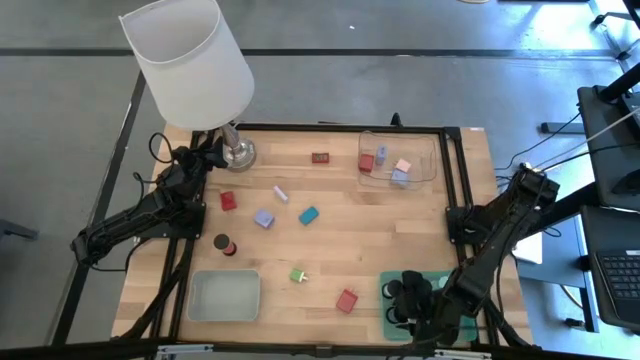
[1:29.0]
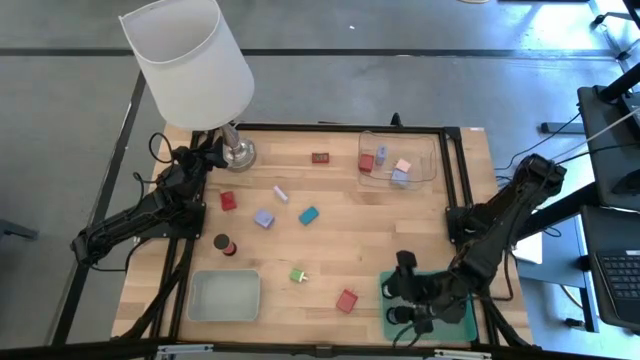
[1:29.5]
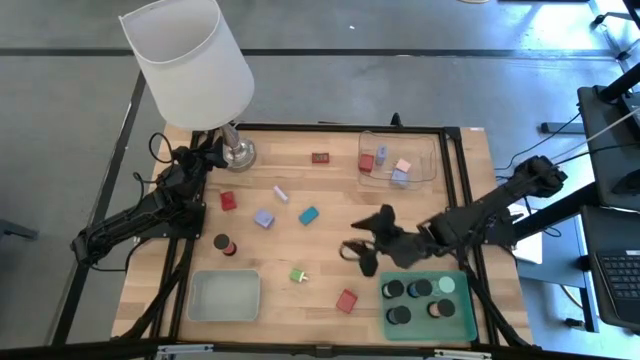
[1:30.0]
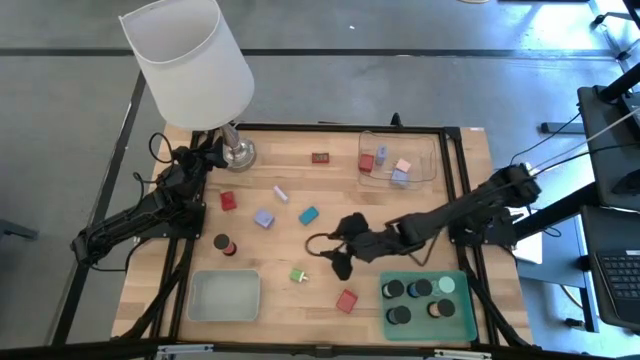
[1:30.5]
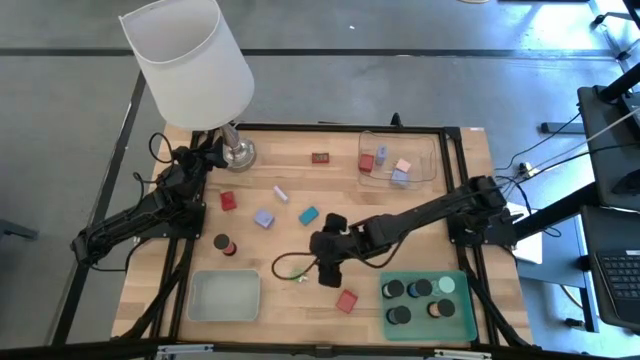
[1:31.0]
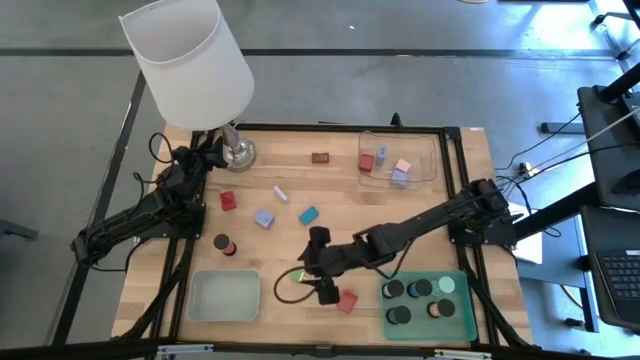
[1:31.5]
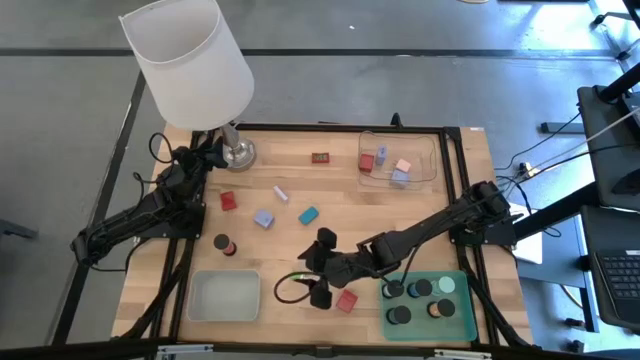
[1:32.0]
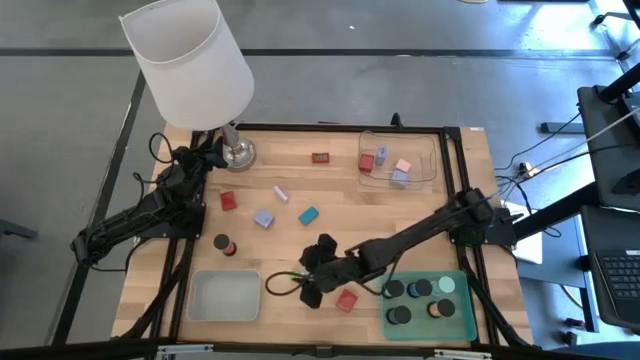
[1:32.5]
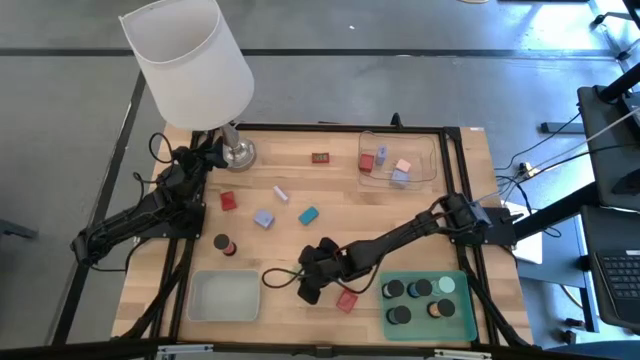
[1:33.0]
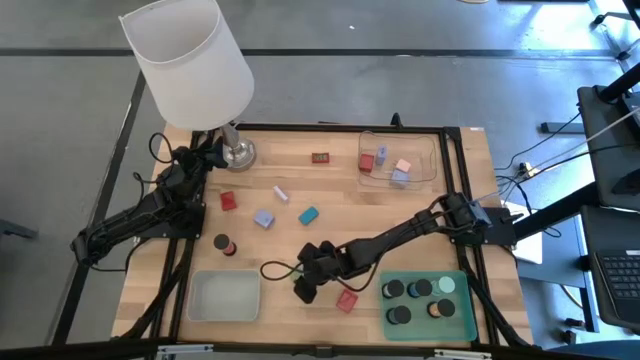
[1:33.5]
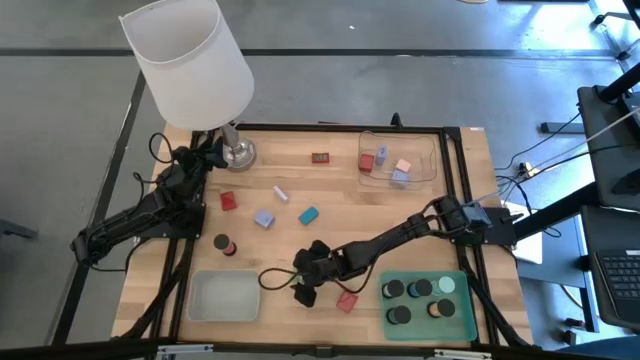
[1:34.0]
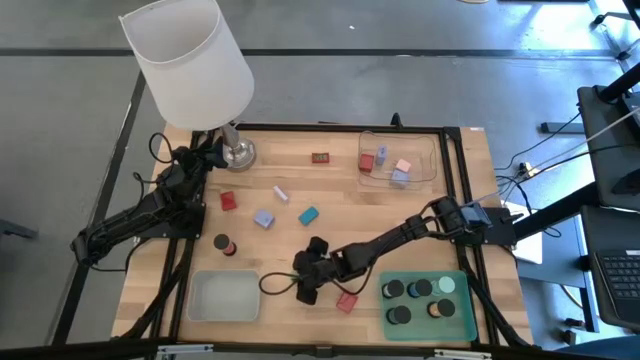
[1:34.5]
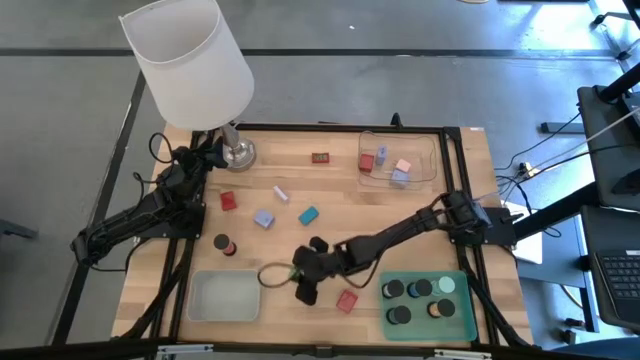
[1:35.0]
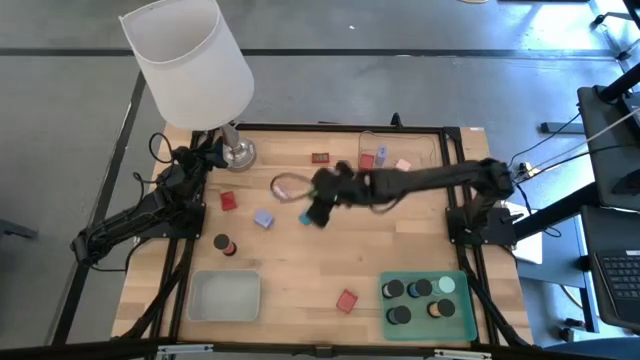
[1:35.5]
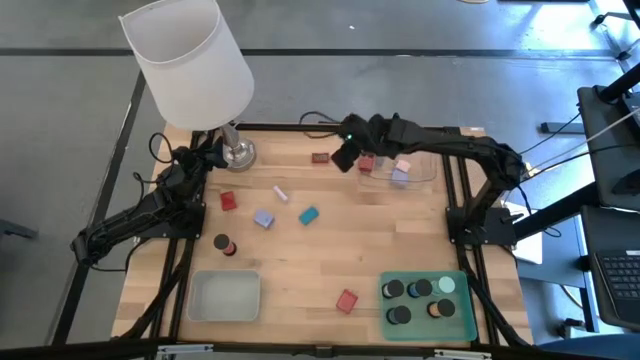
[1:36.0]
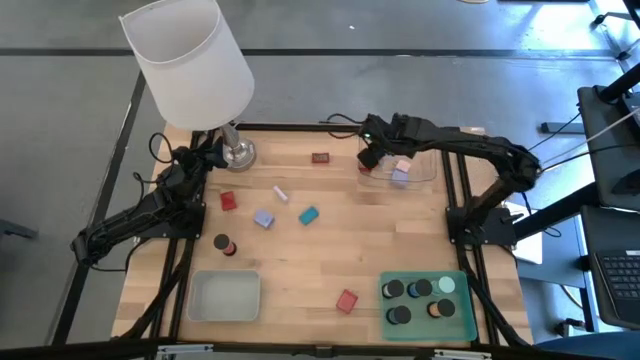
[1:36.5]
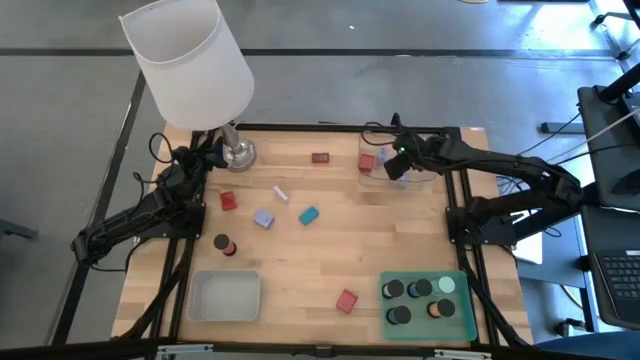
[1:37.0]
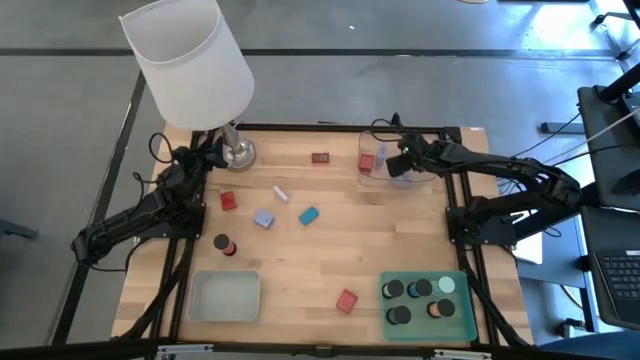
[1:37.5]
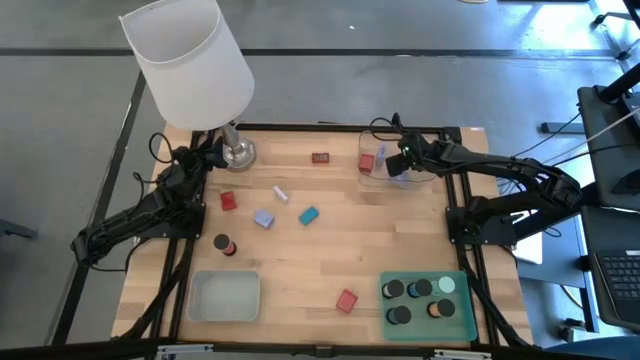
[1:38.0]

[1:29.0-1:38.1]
Task: Pick & Place Office items
Put the green charger adapter into the transparent bin

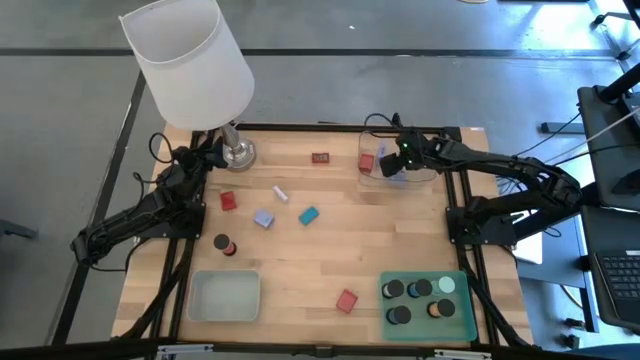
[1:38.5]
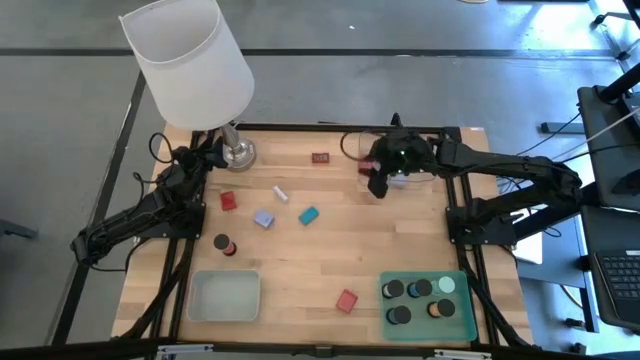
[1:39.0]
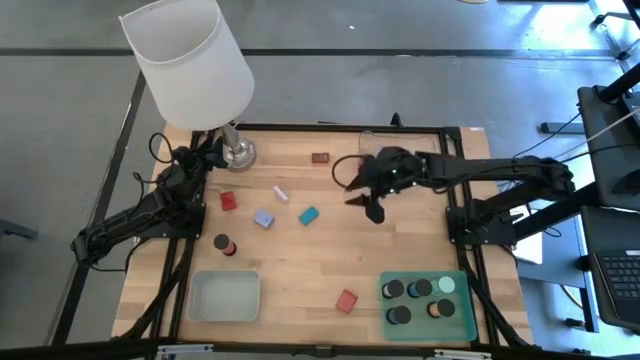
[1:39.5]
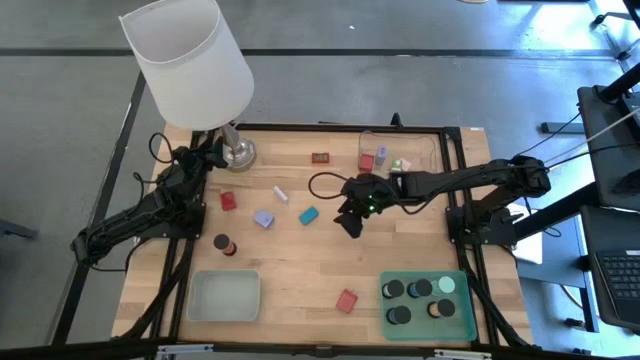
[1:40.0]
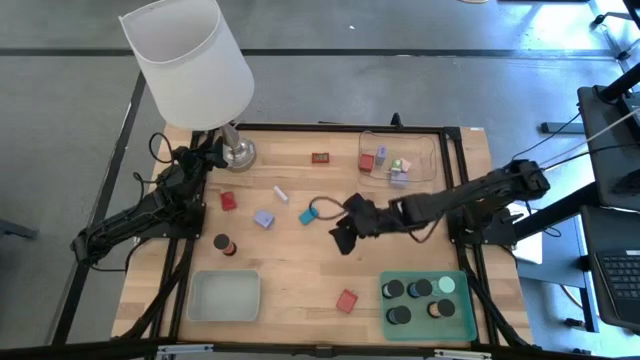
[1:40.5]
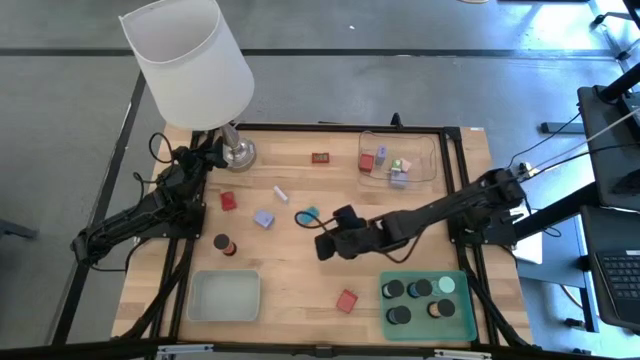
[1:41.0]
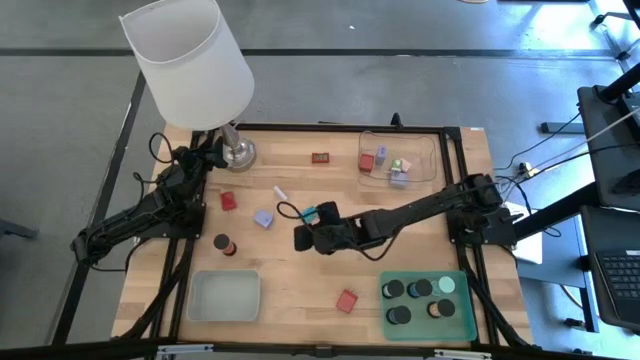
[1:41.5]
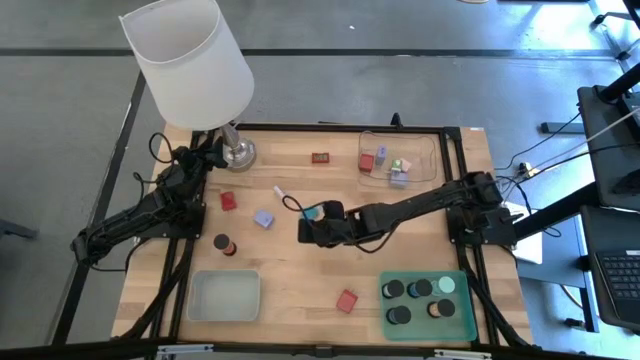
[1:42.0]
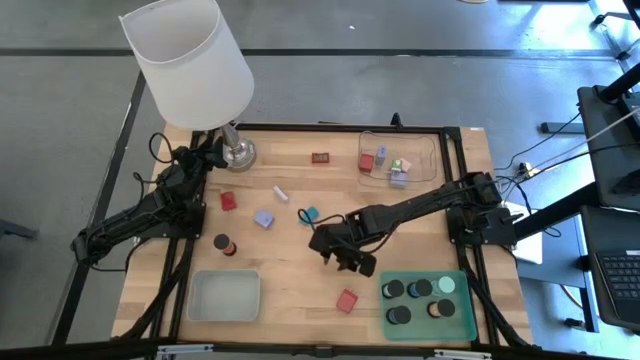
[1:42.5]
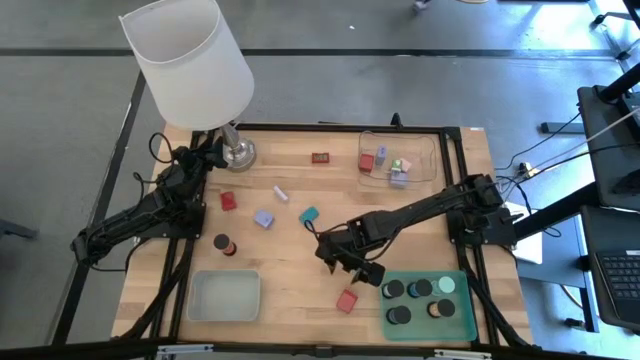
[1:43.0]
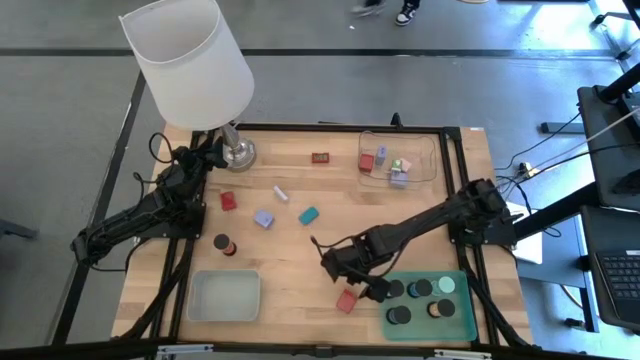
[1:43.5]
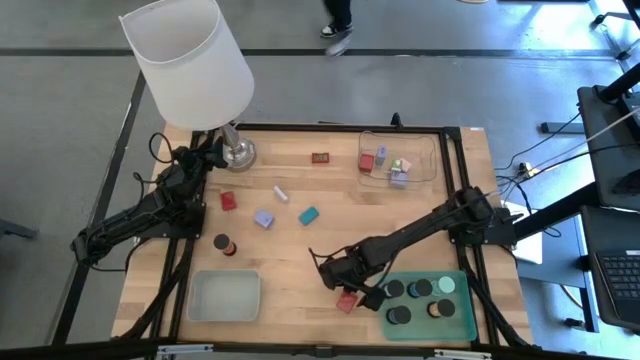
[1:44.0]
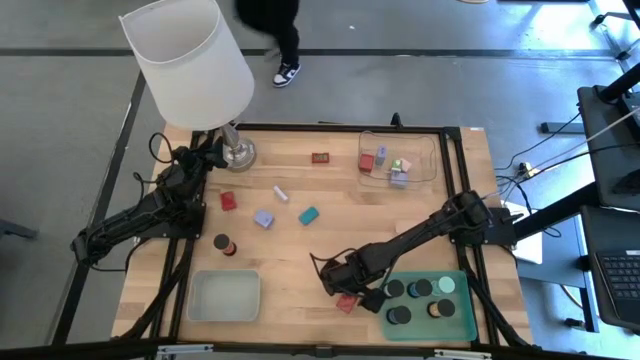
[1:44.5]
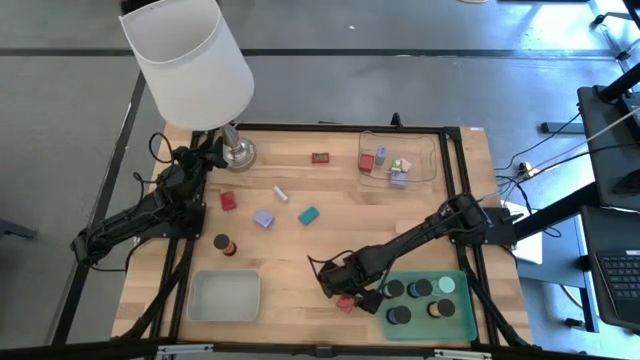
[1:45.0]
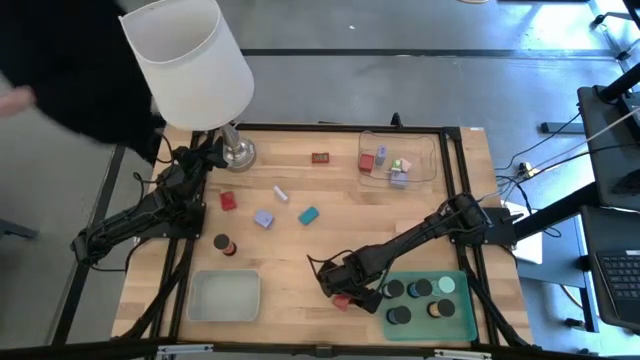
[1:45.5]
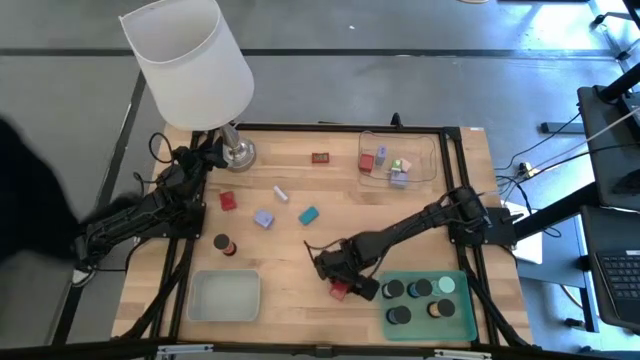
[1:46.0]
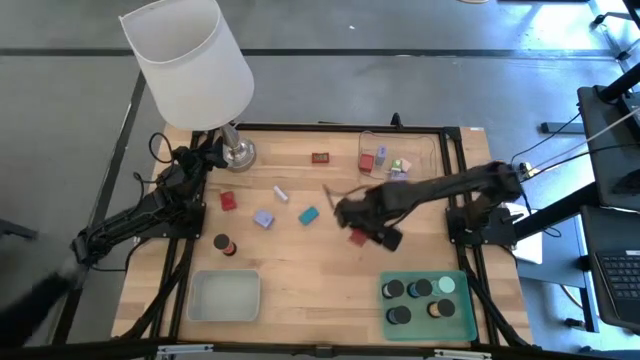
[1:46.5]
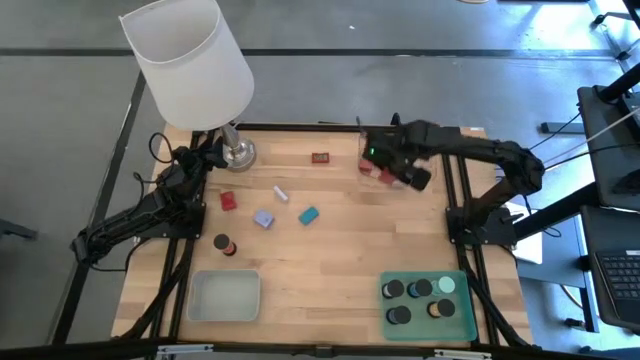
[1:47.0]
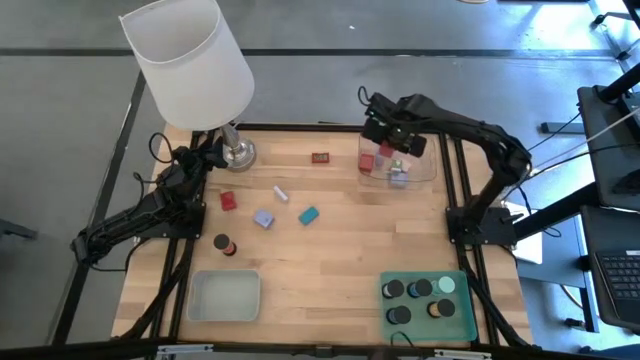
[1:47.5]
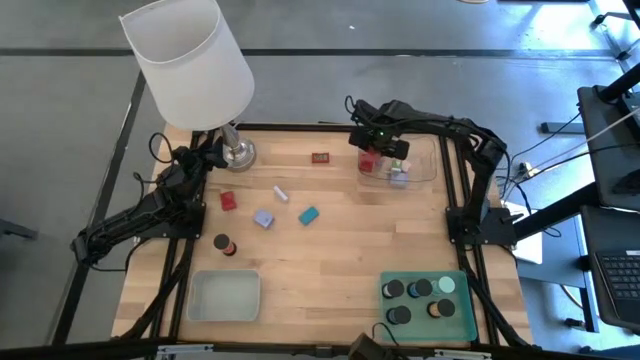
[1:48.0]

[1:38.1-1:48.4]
Put the bottom red charger adapter into the transparent bin

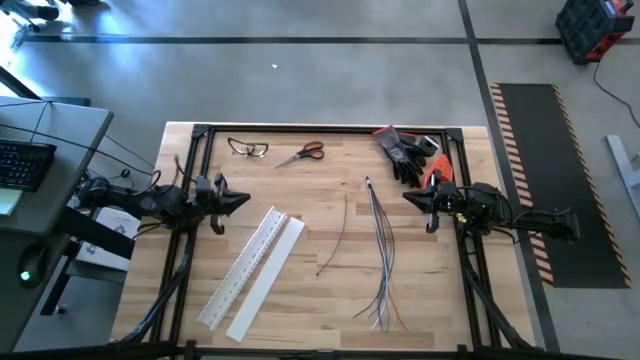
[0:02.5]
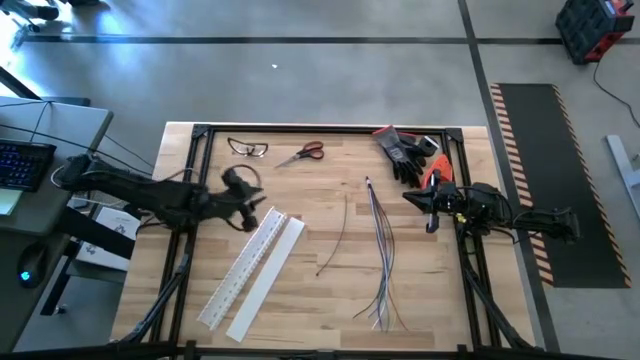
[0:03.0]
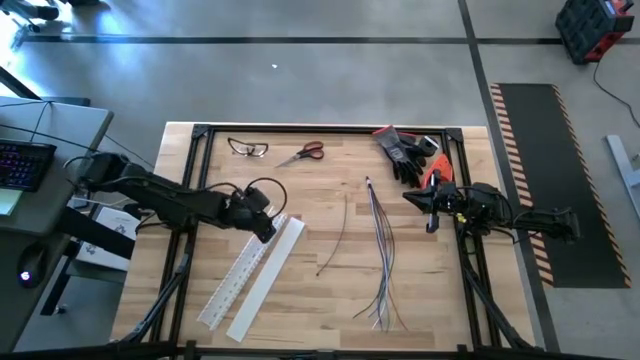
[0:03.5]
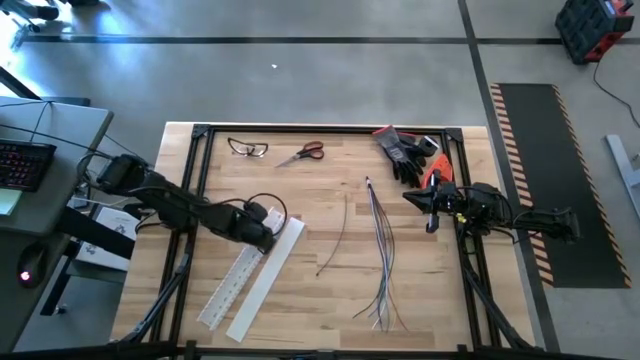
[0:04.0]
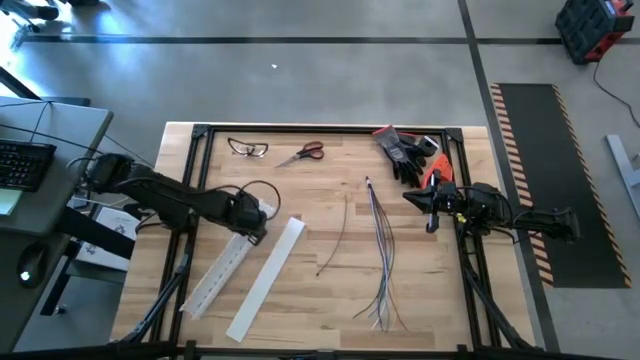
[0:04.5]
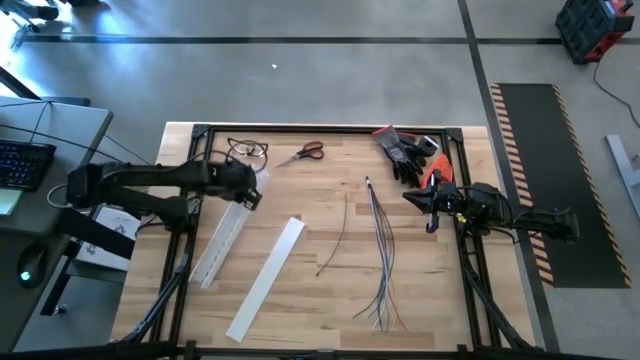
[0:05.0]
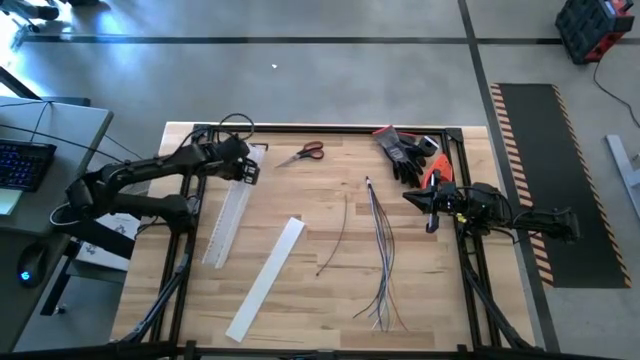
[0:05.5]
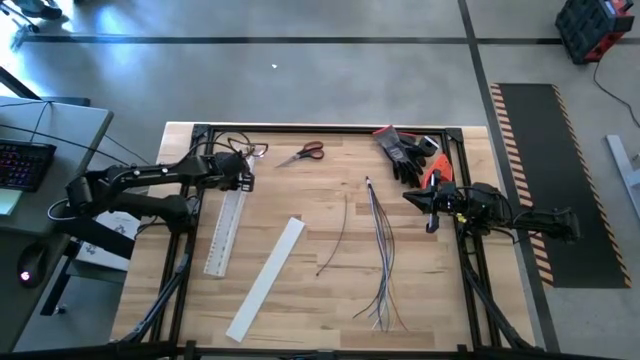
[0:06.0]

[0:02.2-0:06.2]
Task: Ziptie cables
Move the white cable duct to the left side of the table
